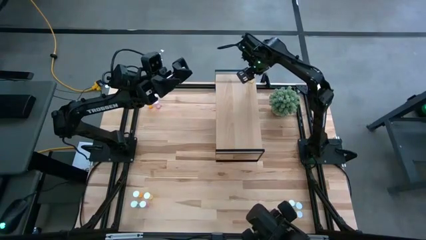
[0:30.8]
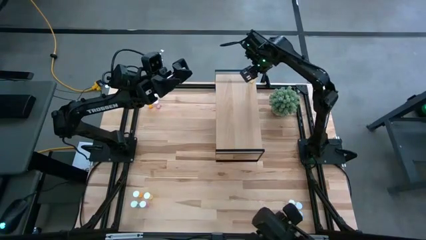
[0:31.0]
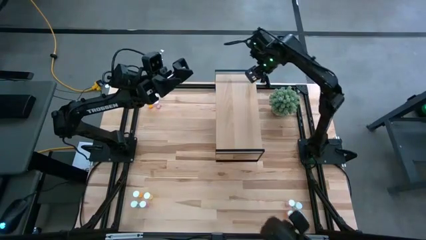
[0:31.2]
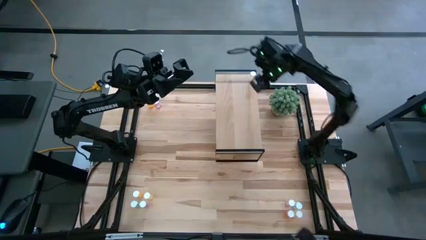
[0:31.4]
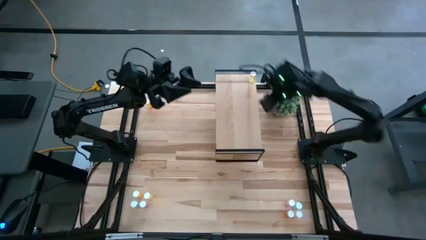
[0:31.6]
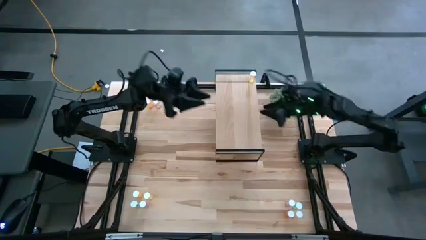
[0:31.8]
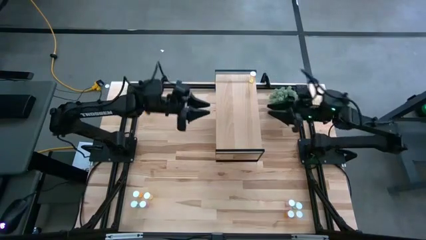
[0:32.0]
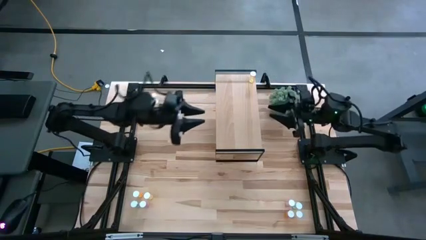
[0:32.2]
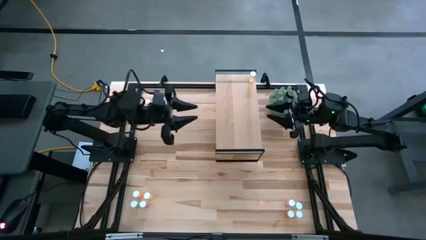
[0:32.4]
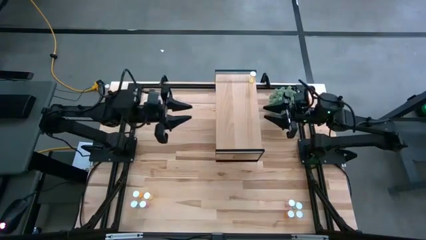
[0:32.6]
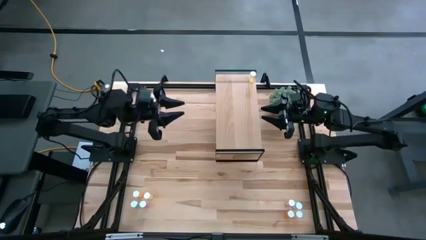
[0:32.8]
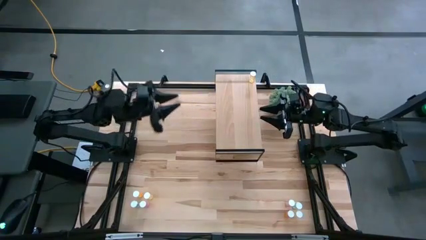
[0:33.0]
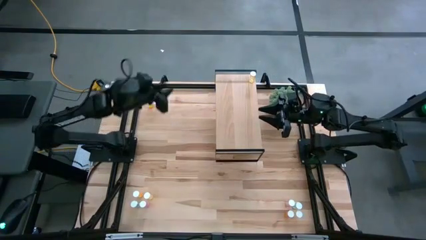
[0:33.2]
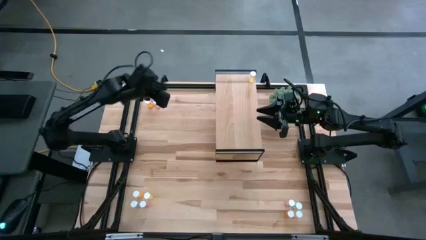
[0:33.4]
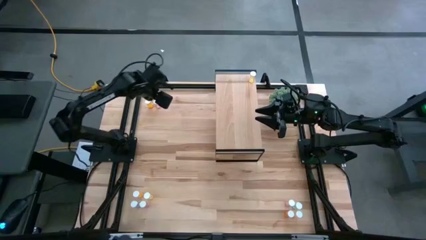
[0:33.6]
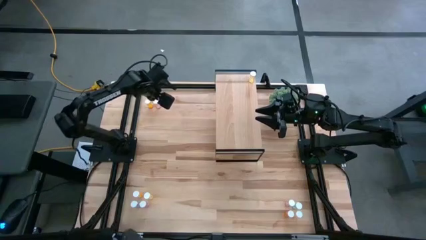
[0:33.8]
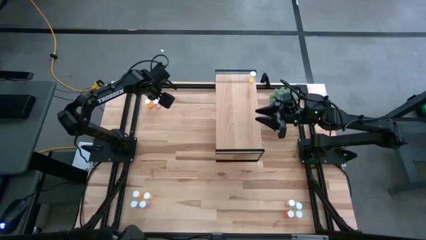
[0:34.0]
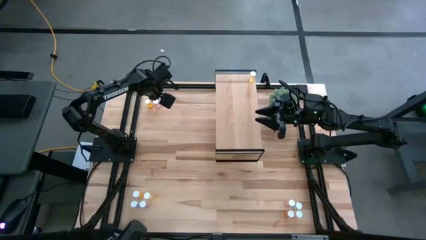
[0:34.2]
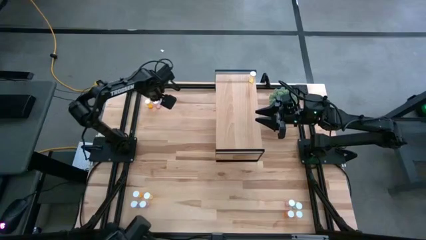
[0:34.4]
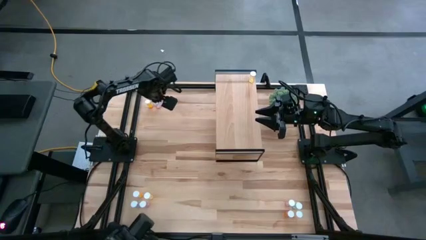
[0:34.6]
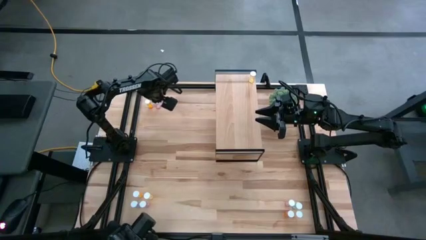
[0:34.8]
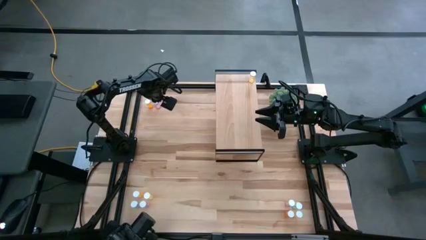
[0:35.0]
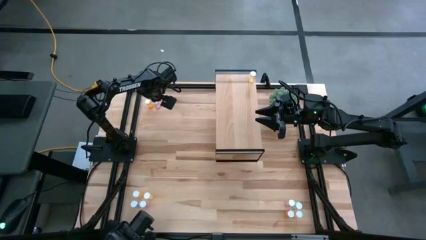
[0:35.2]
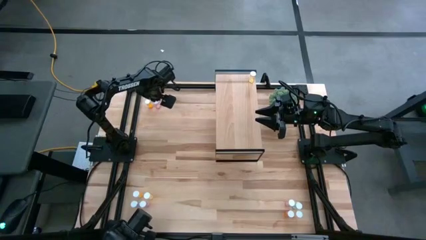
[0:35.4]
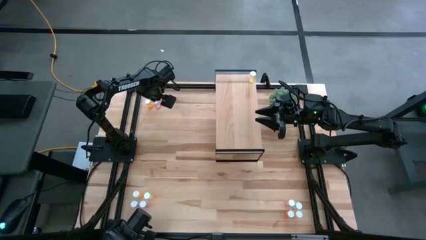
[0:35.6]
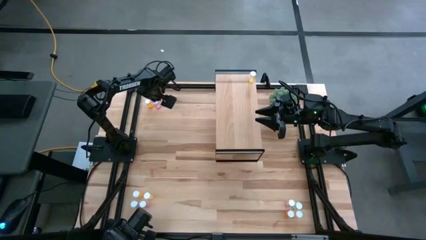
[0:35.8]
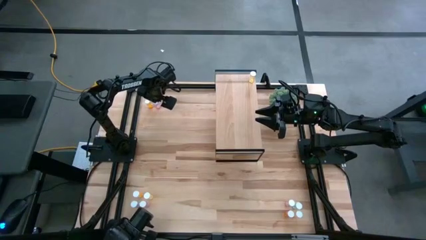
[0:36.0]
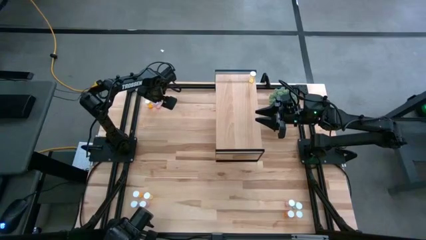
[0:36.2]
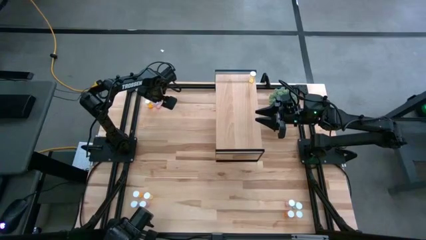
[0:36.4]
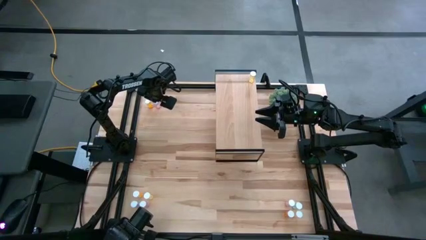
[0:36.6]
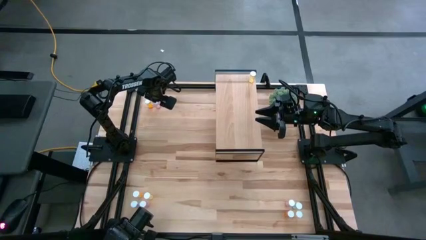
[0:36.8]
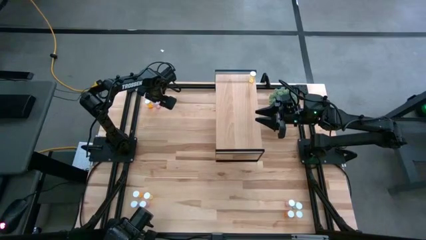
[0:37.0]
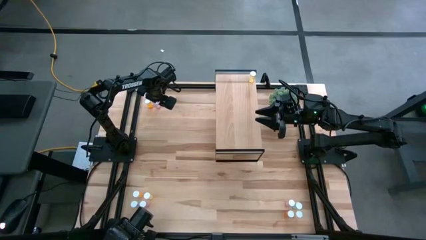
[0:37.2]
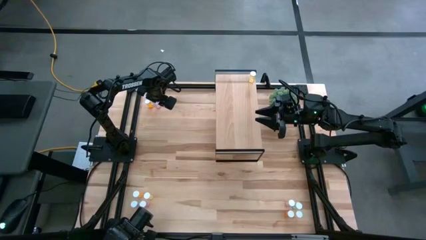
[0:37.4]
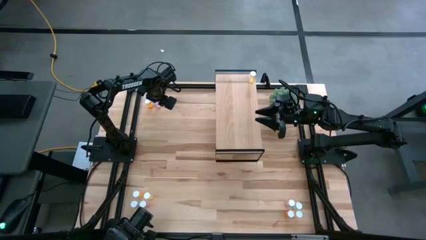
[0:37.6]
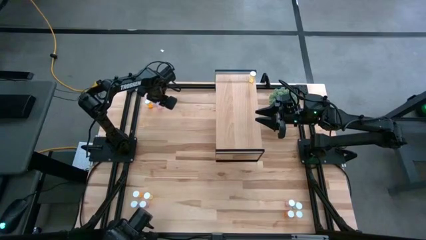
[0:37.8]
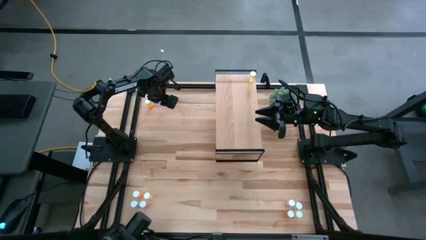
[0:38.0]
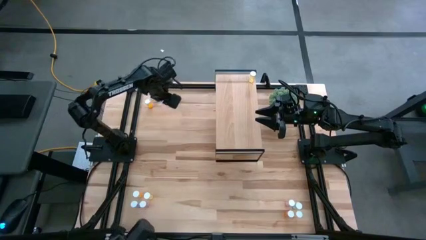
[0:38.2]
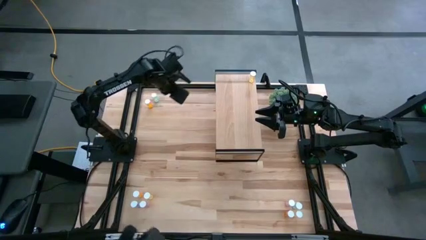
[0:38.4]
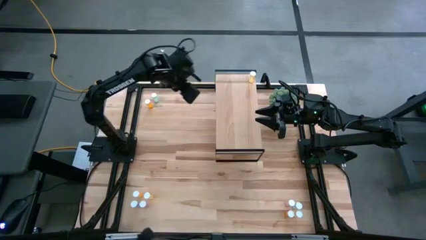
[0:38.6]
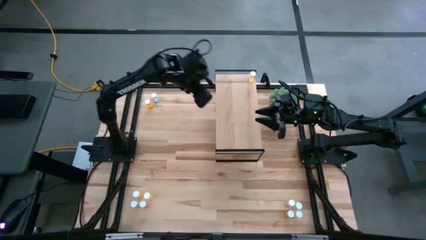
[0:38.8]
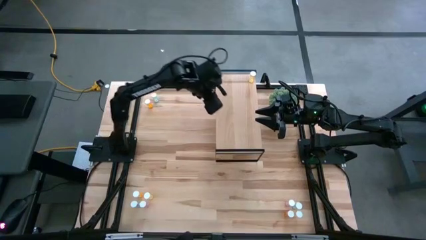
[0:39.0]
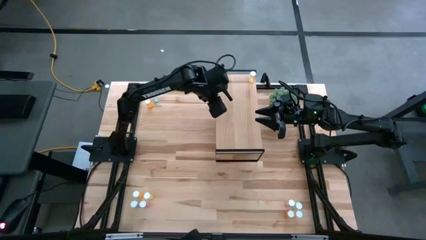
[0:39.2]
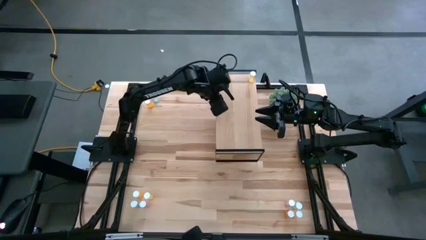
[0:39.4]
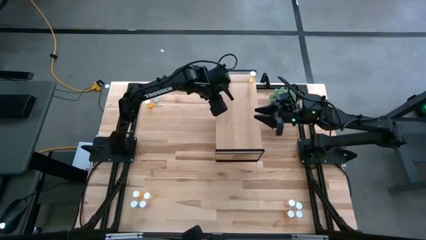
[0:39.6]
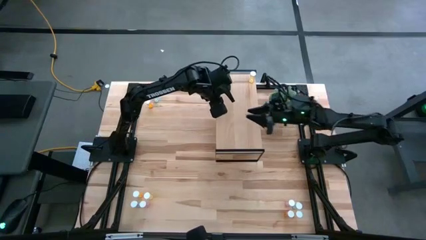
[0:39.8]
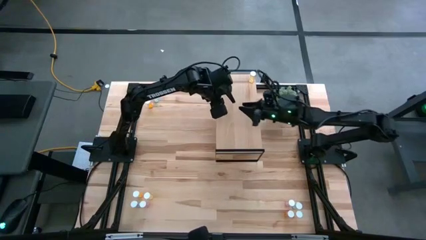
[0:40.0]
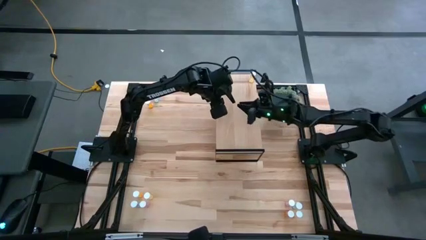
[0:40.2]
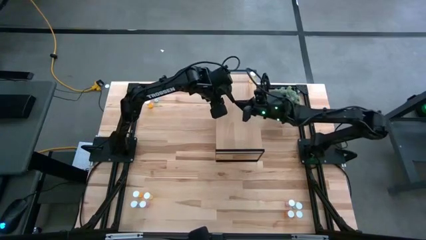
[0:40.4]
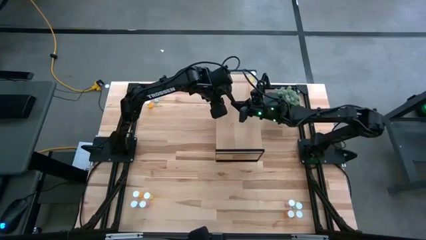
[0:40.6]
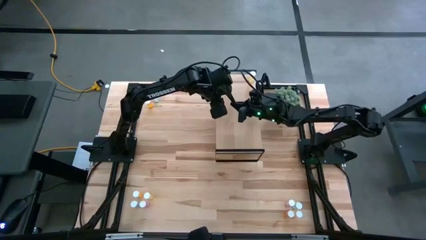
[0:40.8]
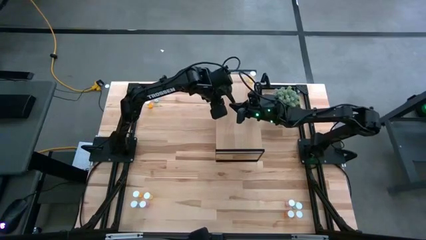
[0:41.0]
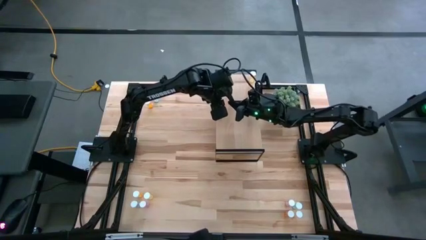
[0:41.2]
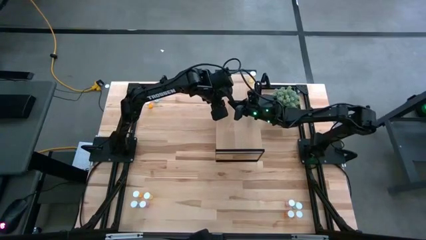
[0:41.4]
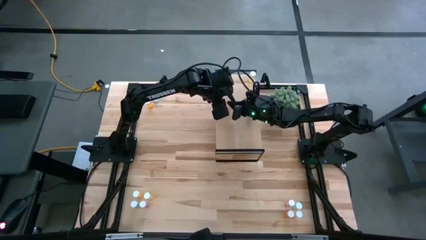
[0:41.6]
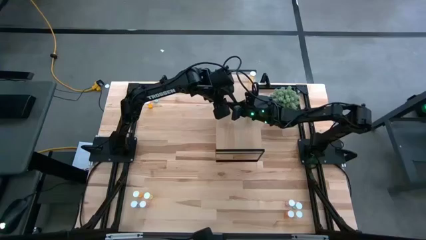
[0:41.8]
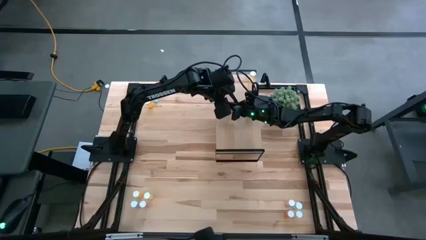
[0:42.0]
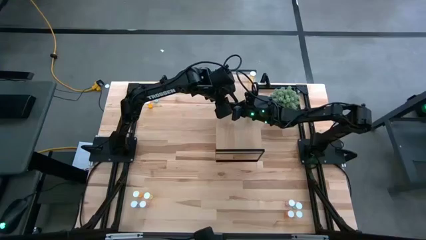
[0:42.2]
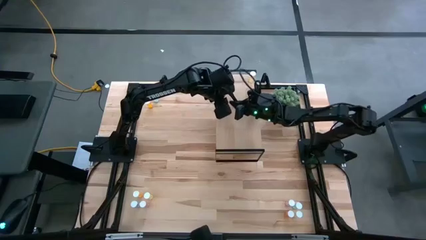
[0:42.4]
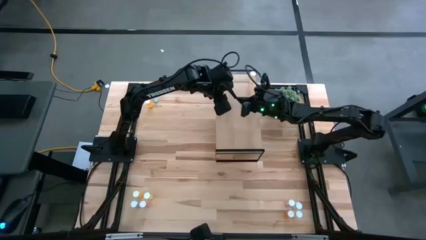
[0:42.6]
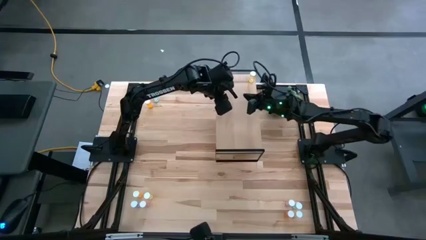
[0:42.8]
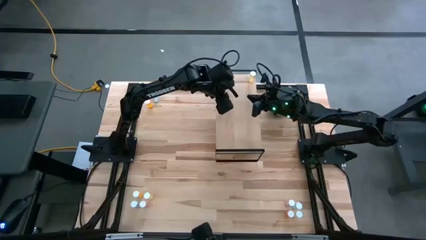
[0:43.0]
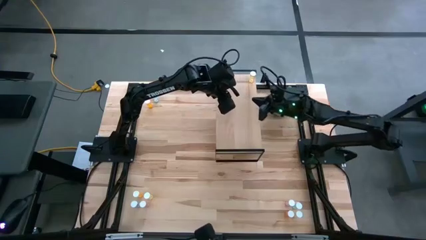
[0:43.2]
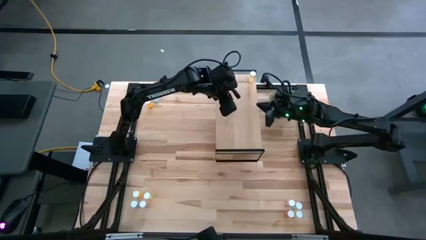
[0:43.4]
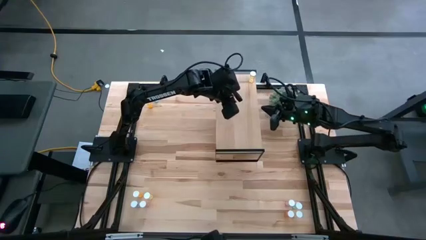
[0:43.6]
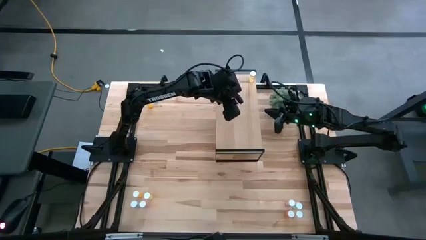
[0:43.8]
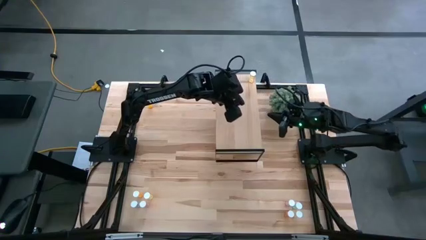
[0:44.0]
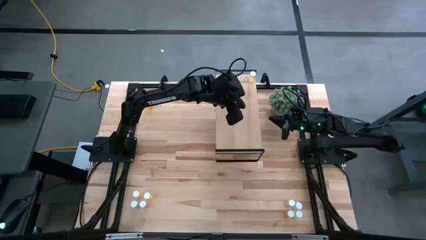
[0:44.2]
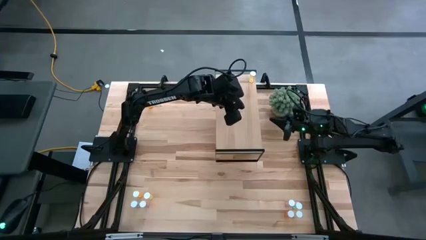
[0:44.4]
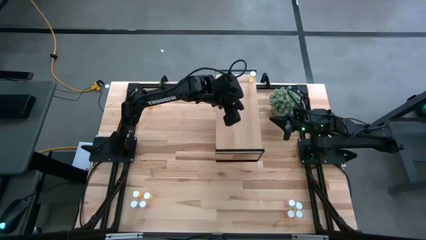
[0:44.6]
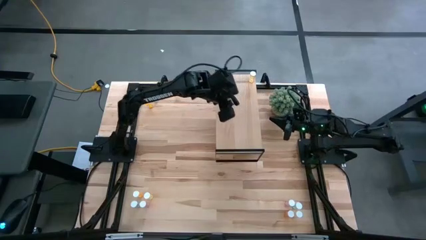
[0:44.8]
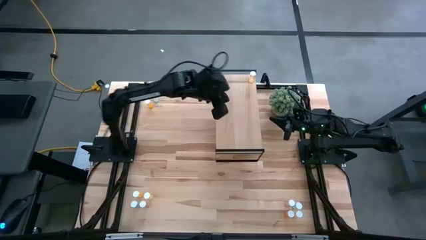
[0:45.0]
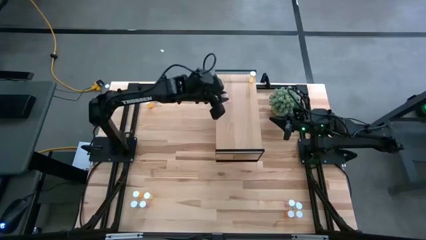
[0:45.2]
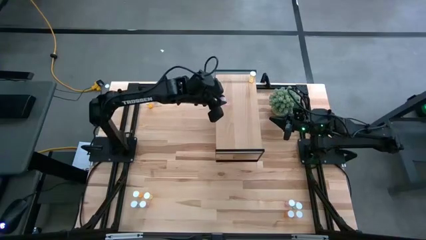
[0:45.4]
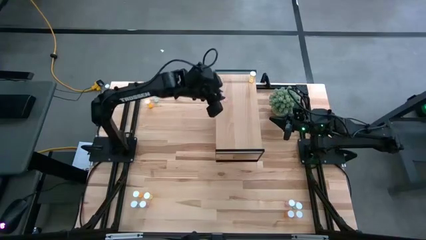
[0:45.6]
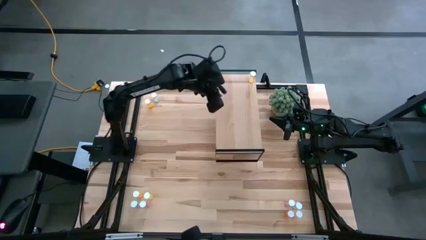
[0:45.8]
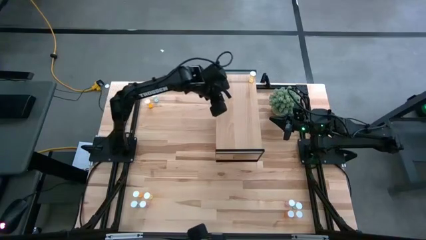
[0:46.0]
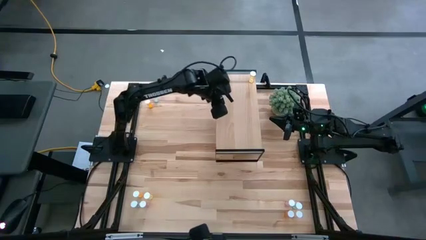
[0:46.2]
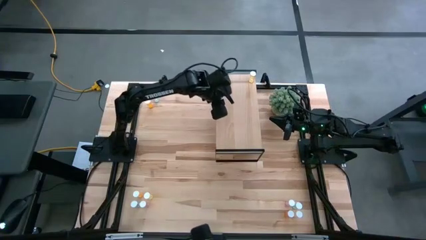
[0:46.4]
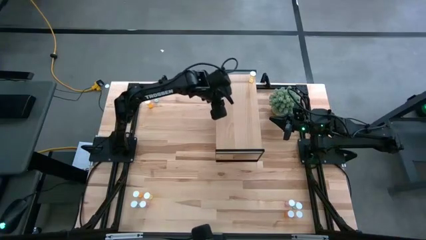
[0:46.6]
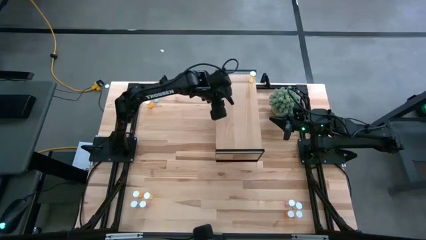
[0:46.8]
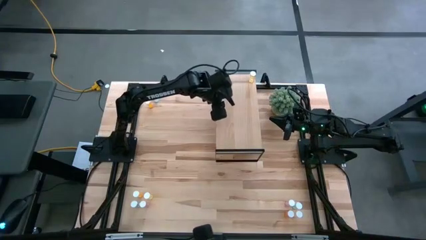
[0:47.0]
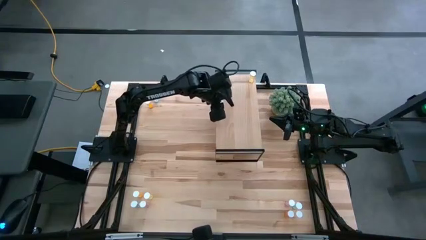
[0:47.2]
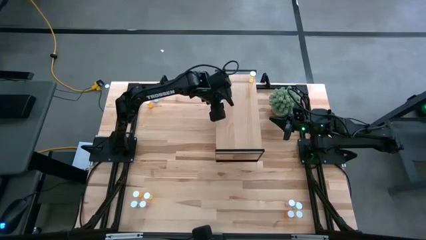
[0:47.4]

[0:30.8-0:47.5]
Task: Pick and place medicine bottles onto shelf by color
Put the top pink bottle on the shelf
